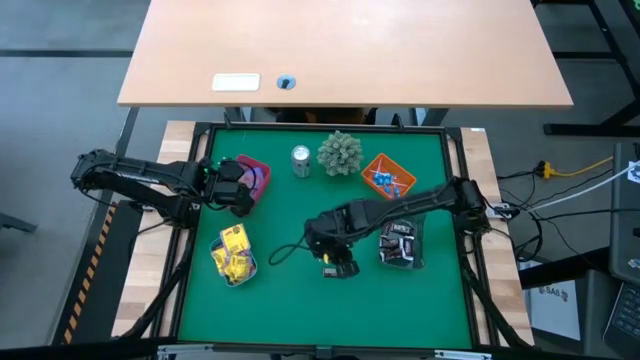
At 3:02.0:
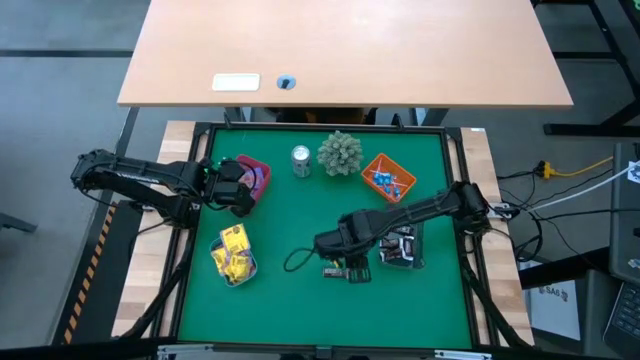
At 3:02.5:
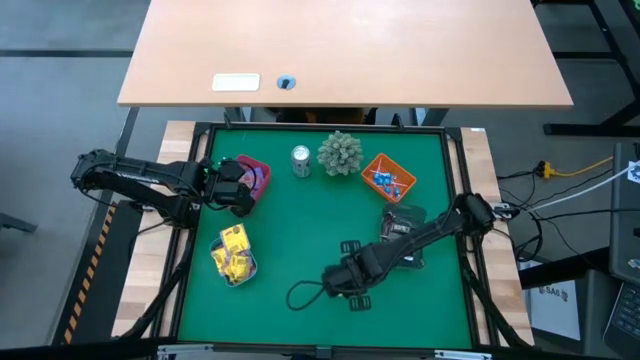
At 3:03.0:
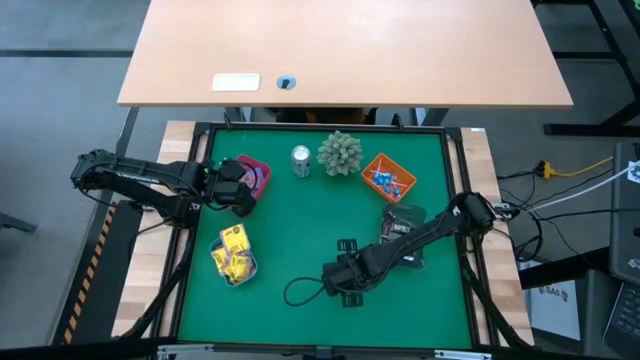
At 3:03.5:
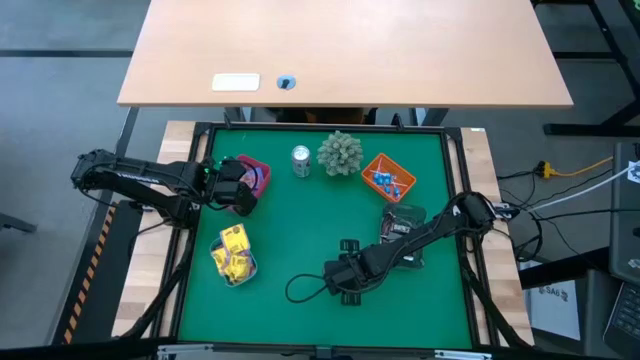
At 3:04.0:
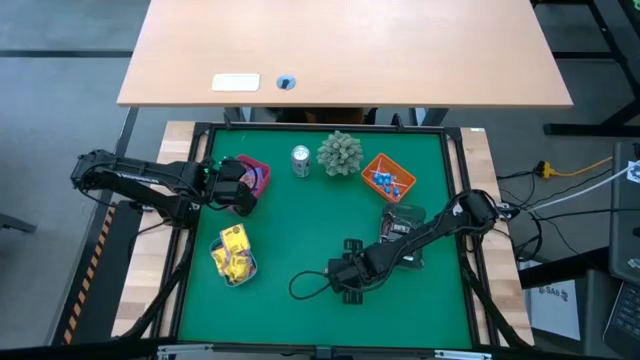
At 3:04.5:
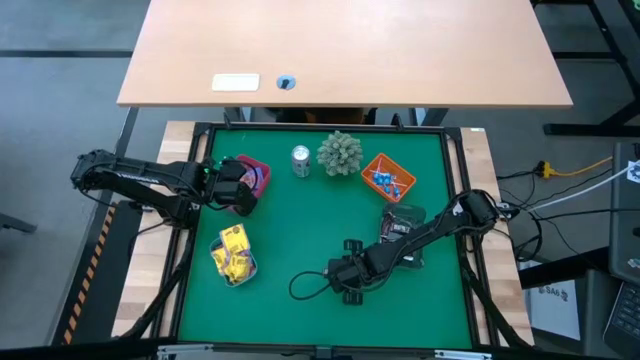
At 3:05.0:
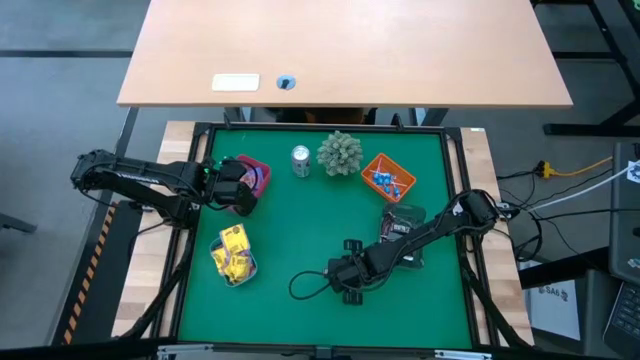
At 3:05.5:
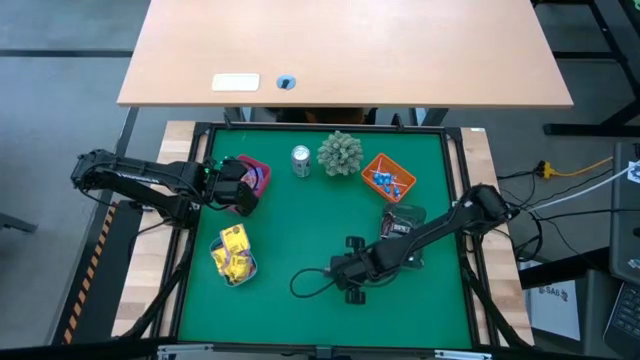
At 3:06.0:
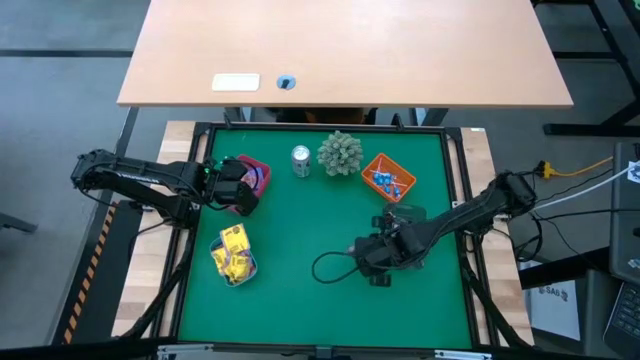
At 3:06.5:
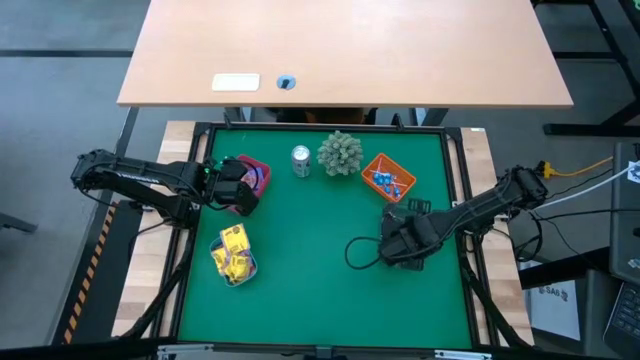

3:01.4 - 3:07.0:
Task: Sort candy
Put the brown chocolate candy into the black bin

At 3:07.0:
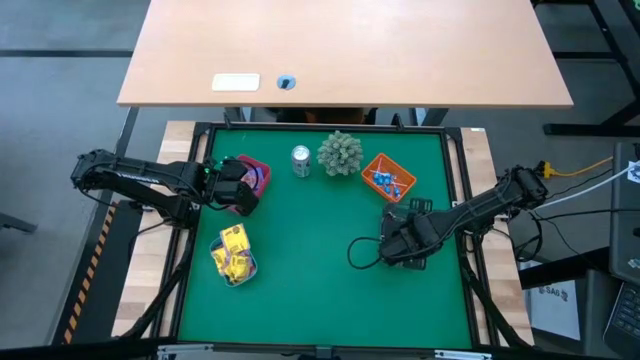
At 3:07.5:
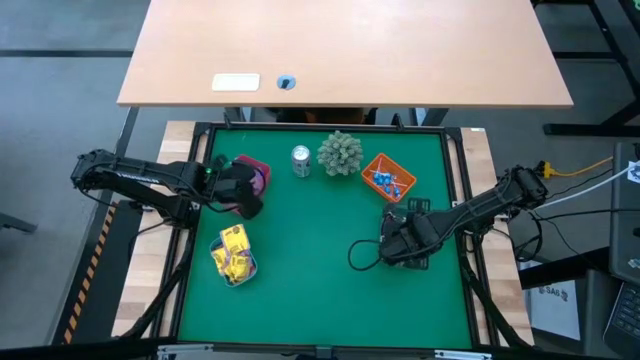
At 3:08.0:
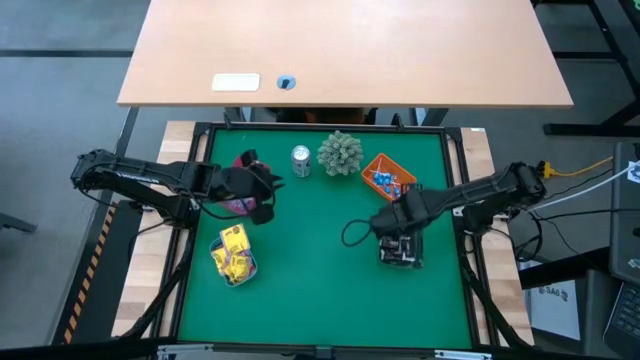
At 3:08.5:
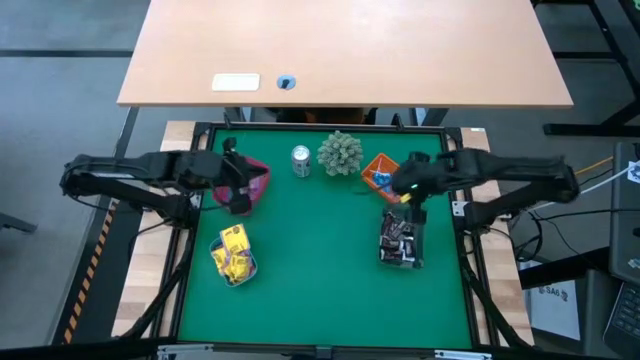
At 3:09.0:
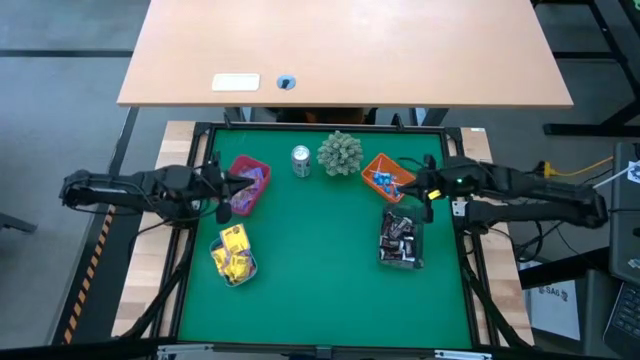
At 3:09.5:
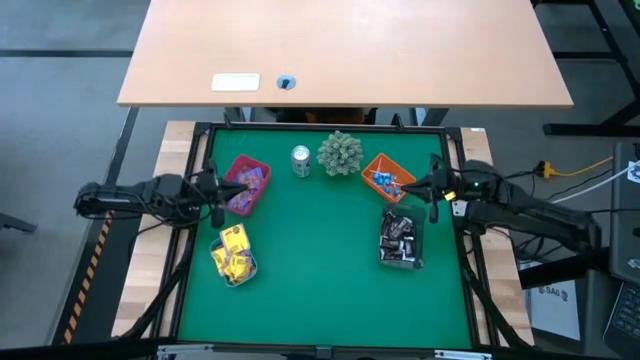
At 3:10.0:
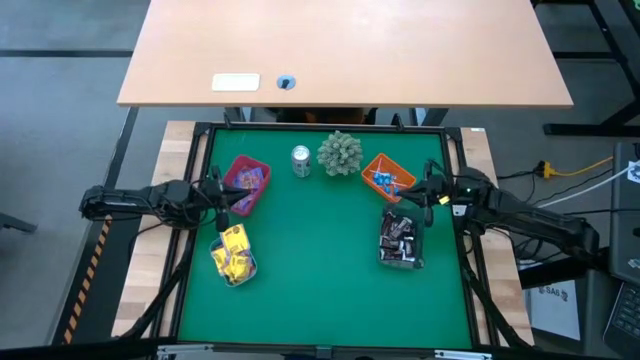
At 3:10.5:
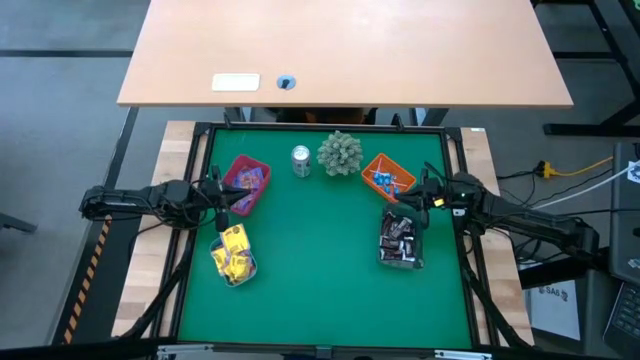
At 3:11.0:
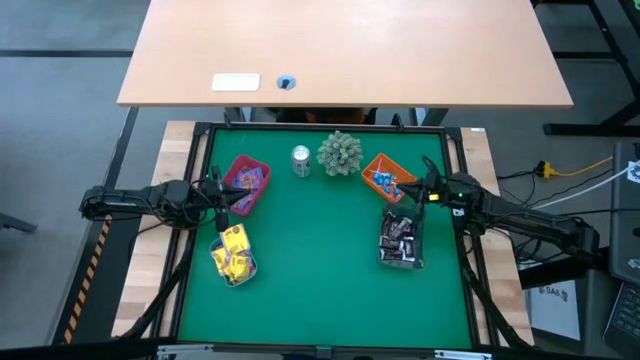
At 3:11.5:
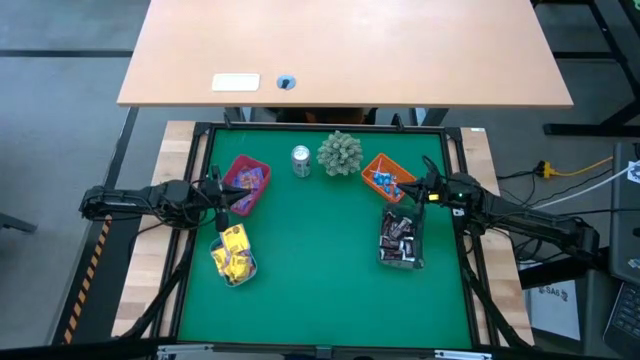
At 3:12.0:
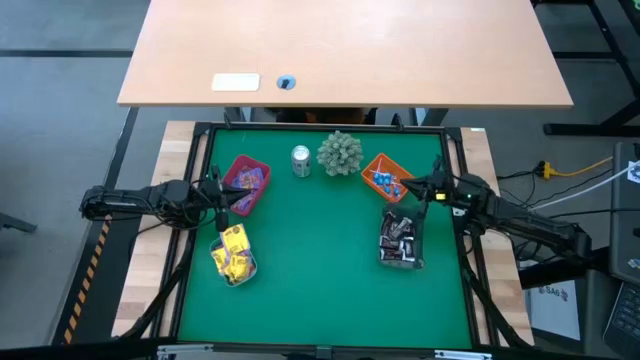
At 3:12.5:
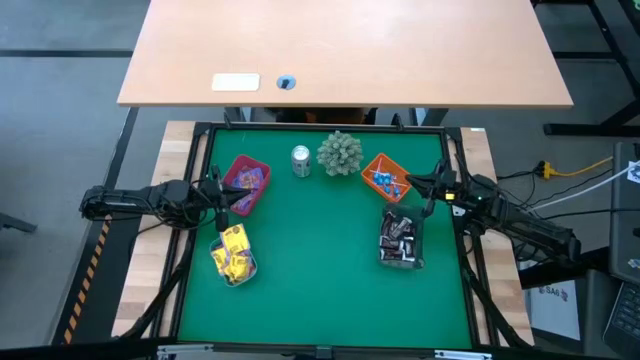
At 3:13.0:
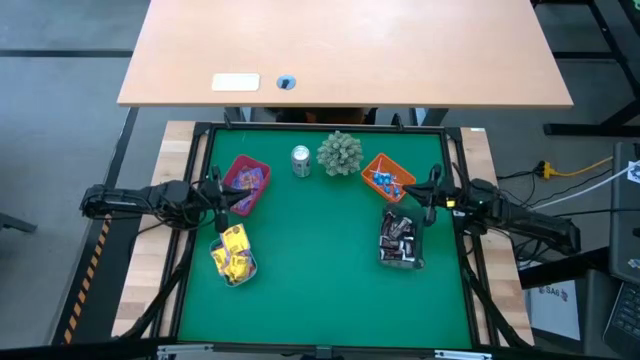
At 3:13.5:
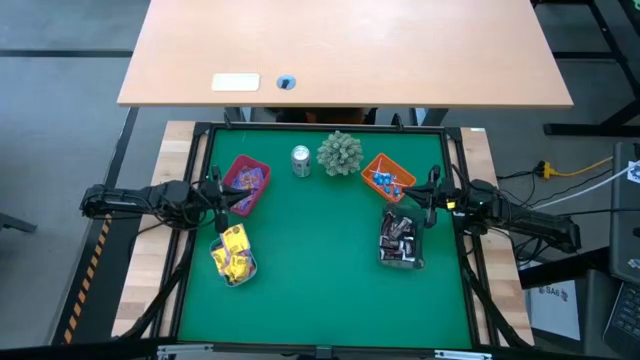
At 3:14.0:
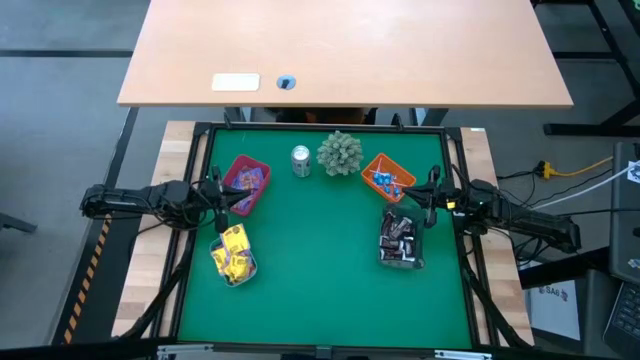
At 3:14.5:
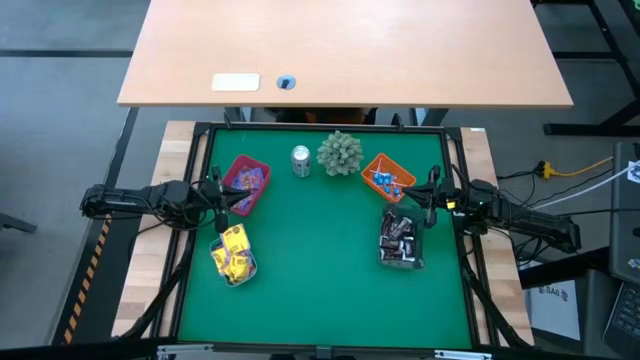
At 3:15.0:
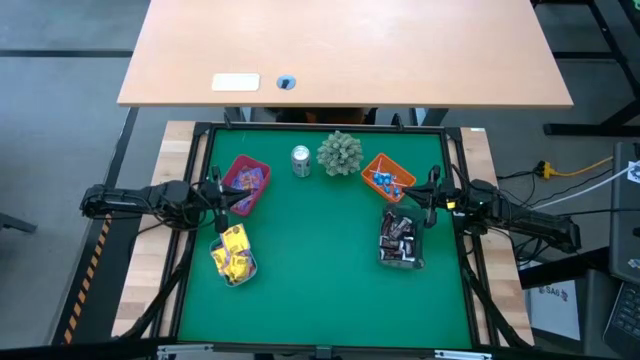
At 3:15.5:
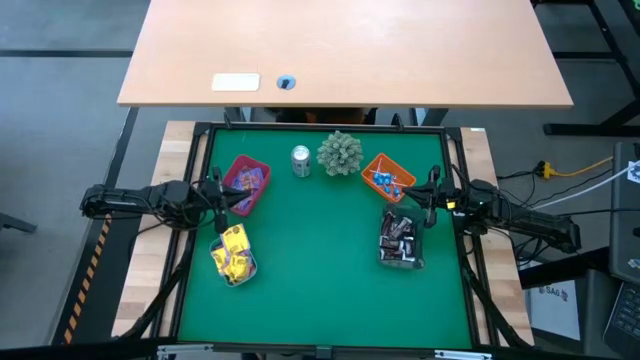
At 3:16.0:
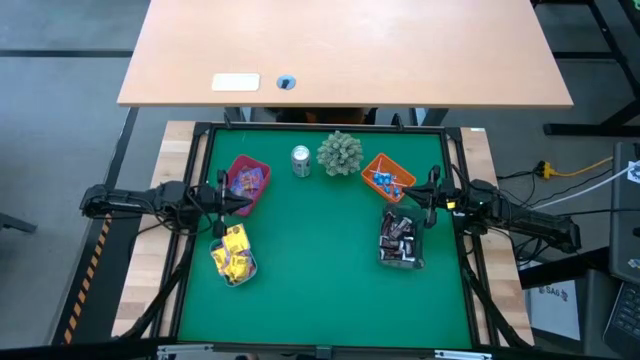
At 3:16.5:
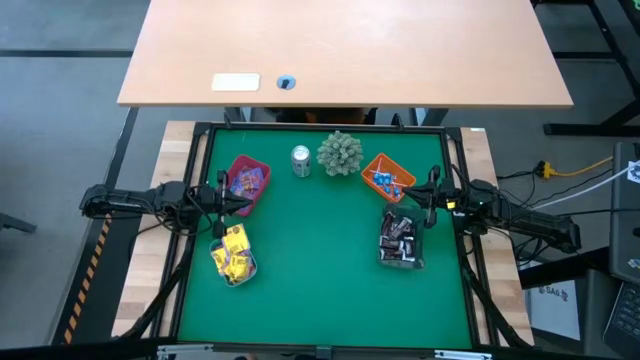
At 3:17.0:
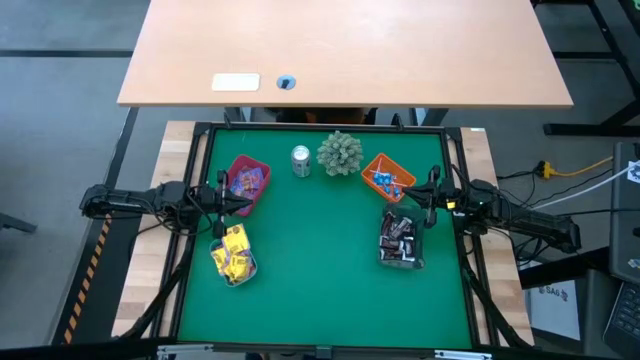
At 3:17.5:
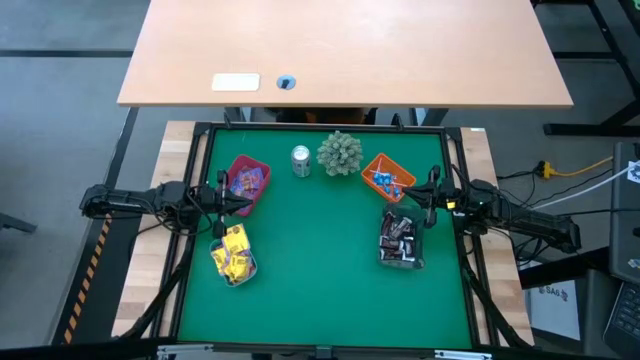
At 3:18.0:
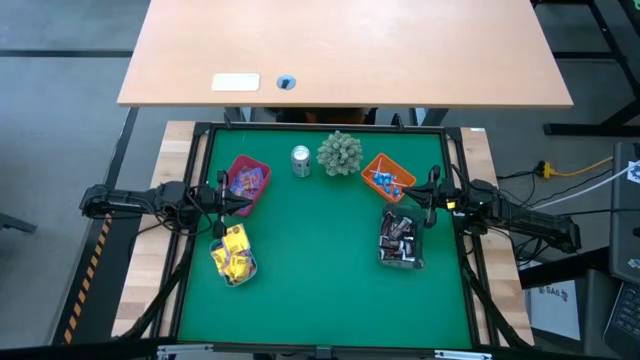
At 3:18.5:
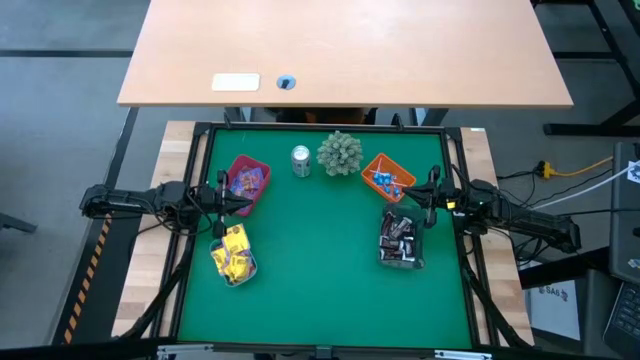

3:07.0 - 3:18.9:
Return to Home Position

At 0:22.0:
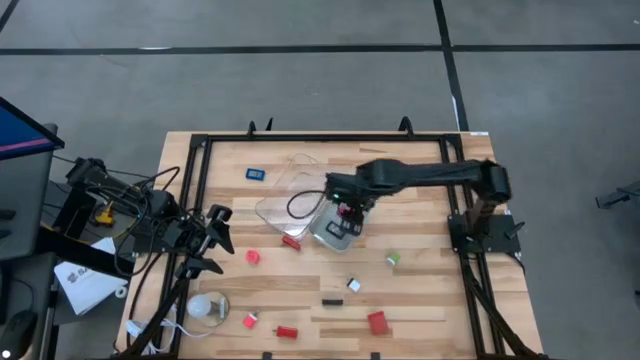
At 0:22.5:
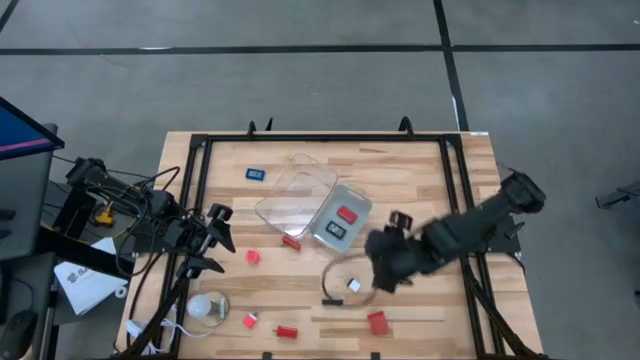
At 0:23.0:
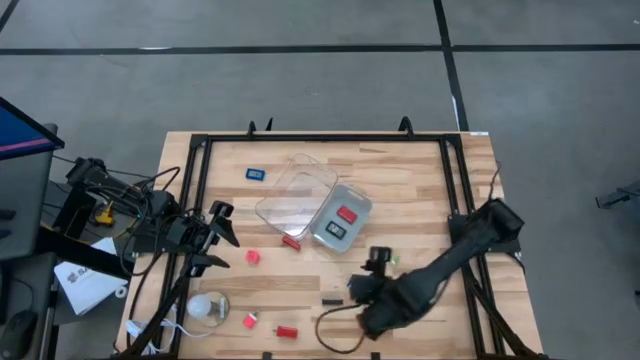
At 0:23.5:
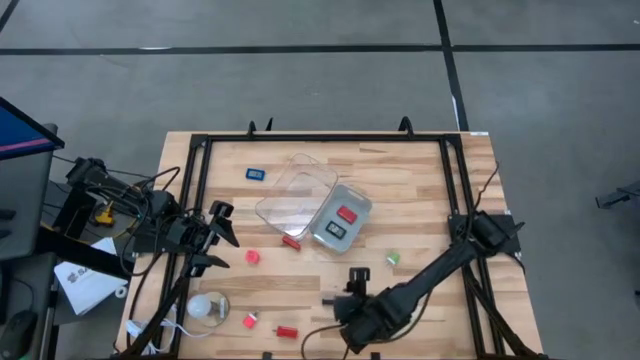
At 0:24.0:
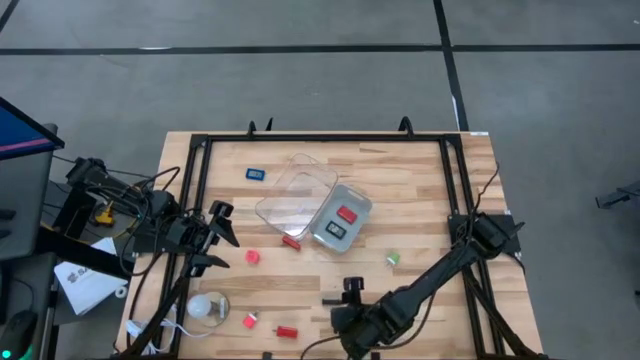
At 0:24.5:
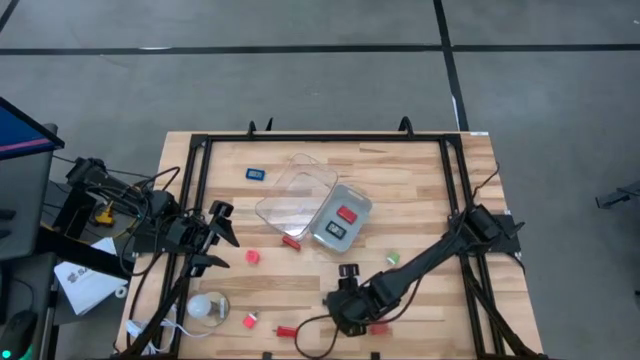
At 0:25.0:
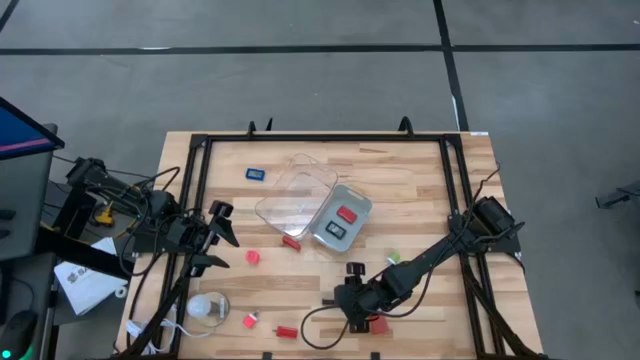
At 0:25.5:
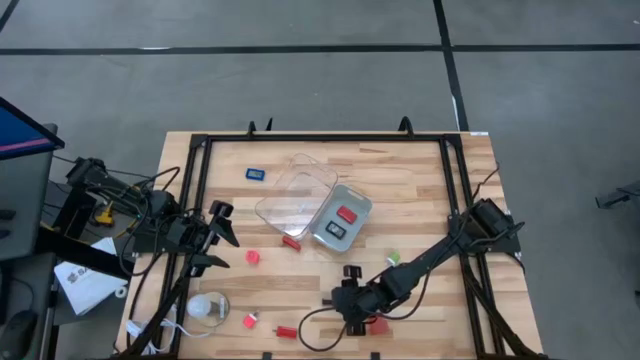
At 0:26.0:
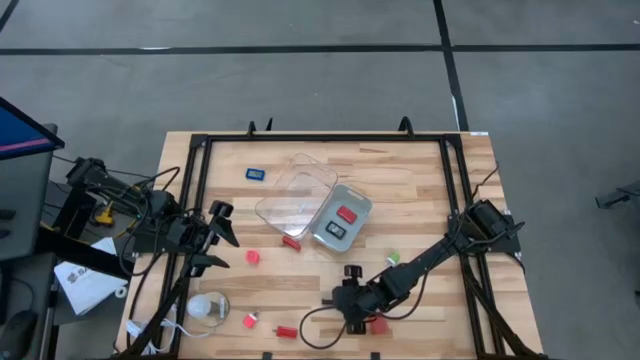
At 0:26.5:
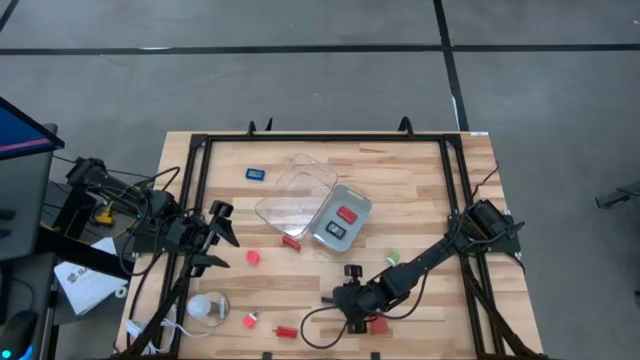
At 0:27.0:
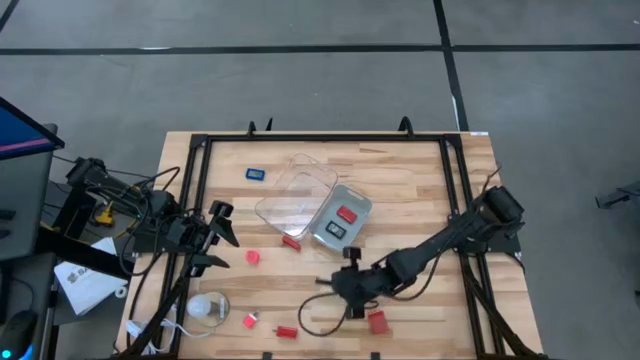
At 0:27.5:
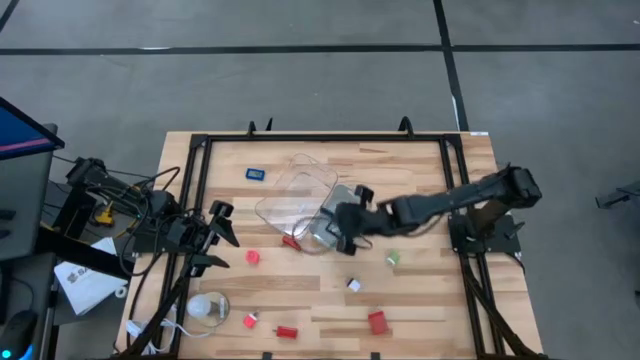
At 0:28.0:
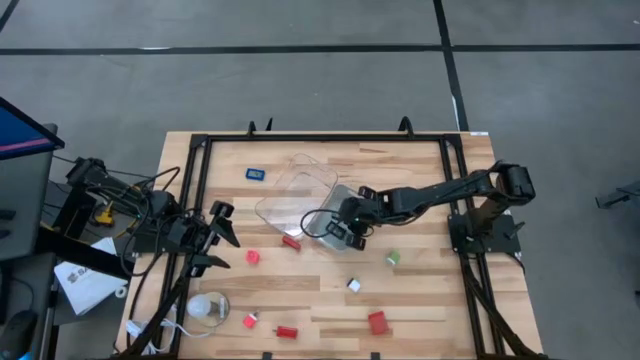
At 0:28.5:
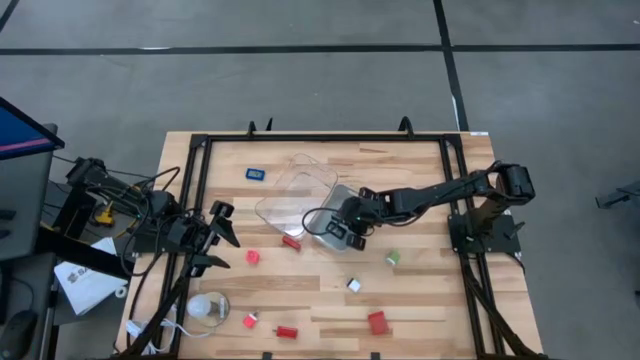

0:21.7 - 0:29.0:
Task: Pick & Place Office items
Put the black digital timer into the gray bin
